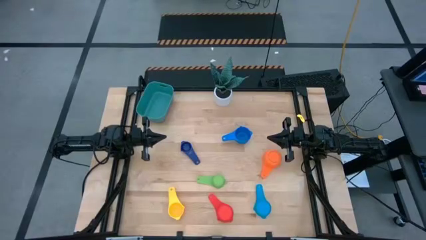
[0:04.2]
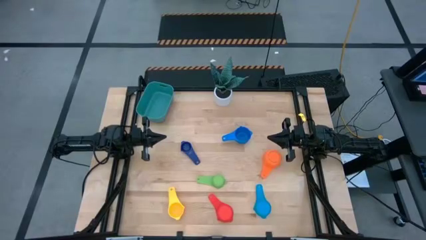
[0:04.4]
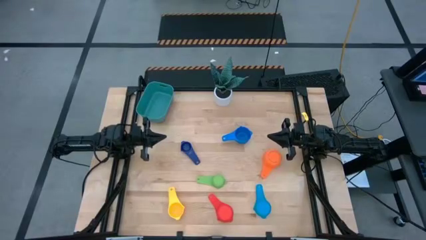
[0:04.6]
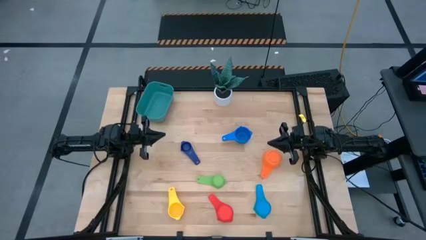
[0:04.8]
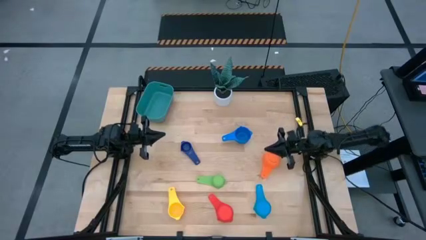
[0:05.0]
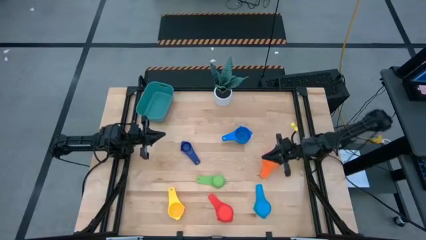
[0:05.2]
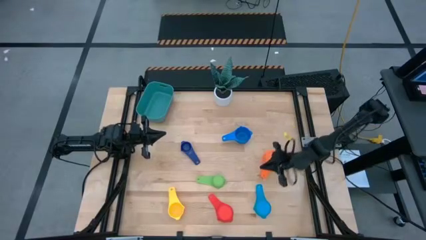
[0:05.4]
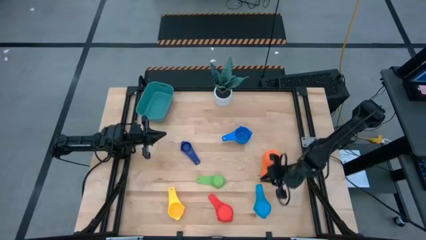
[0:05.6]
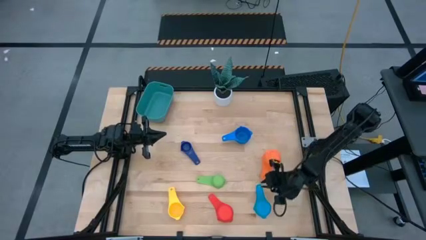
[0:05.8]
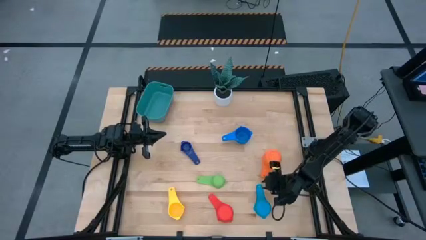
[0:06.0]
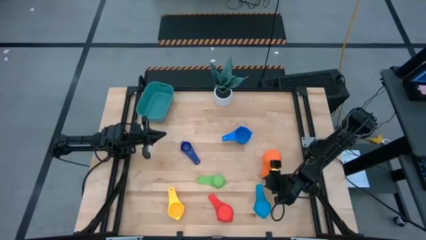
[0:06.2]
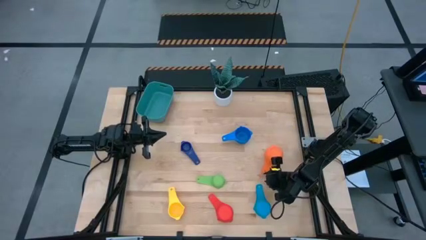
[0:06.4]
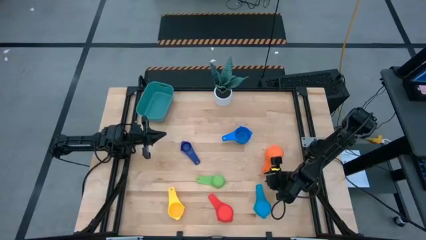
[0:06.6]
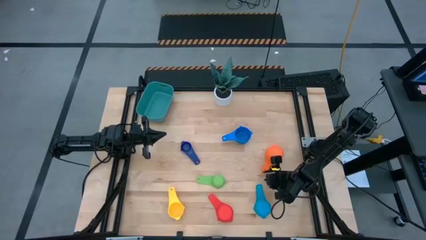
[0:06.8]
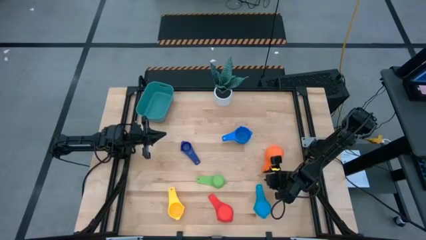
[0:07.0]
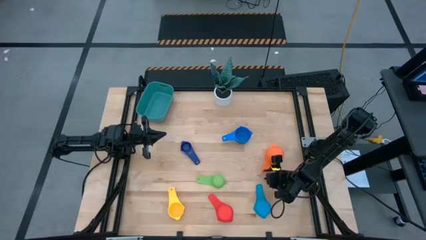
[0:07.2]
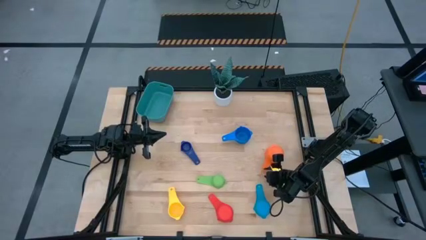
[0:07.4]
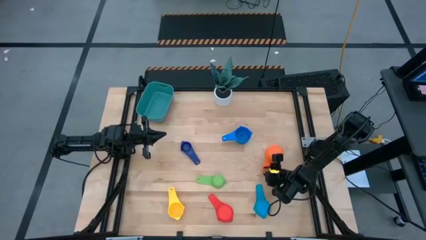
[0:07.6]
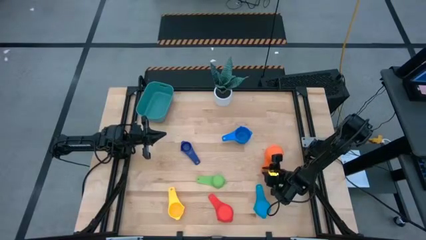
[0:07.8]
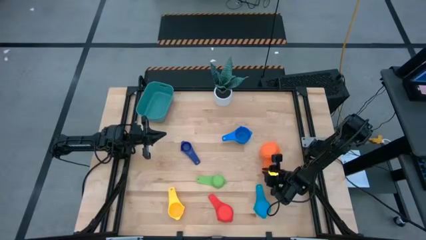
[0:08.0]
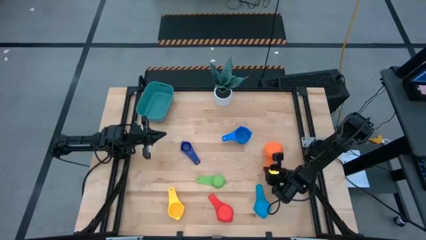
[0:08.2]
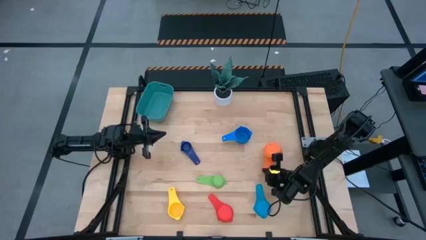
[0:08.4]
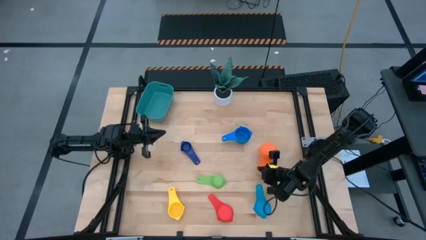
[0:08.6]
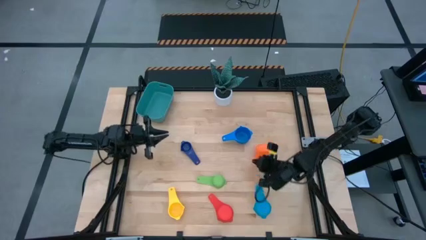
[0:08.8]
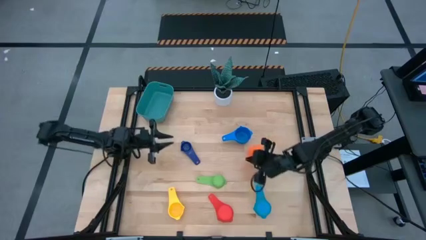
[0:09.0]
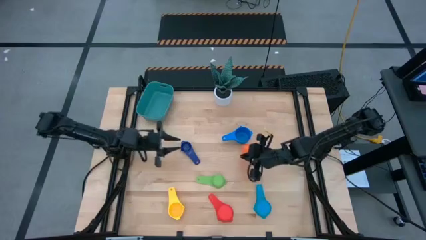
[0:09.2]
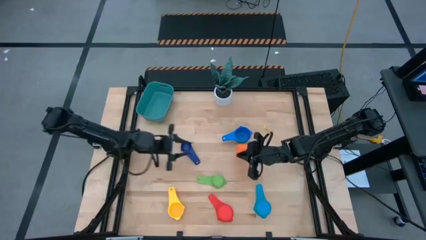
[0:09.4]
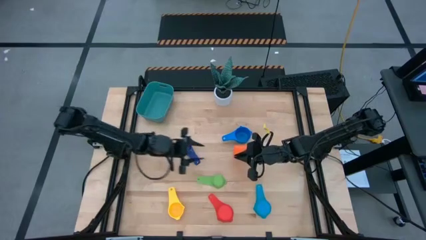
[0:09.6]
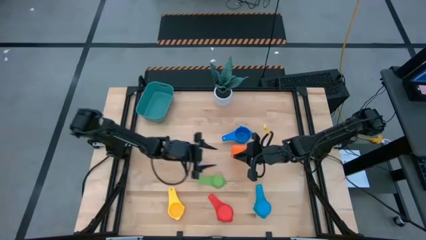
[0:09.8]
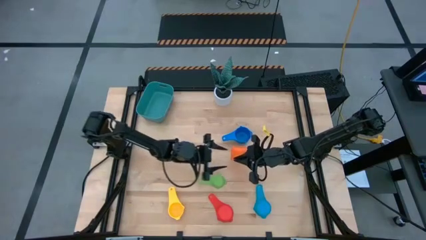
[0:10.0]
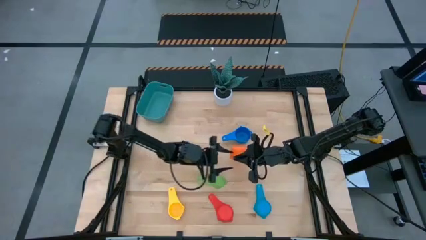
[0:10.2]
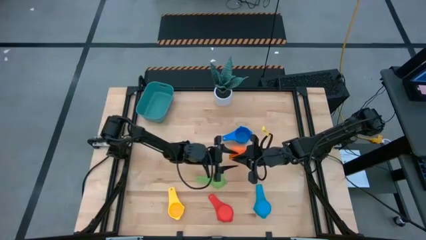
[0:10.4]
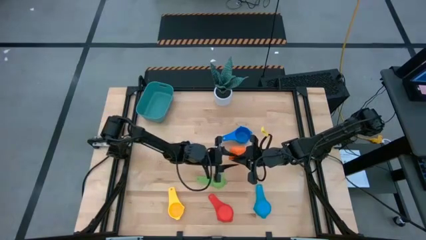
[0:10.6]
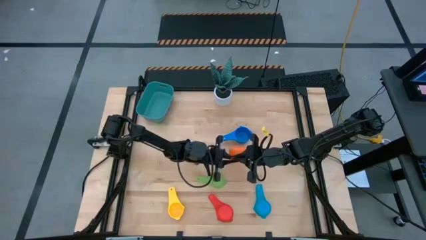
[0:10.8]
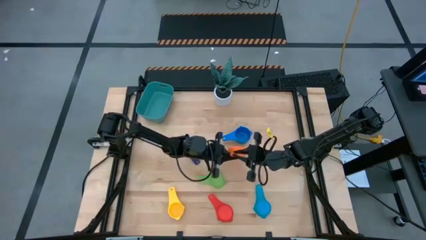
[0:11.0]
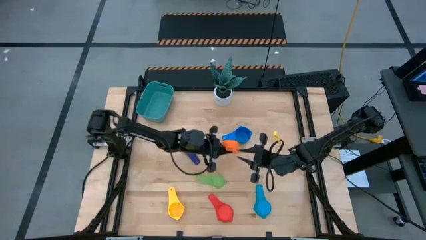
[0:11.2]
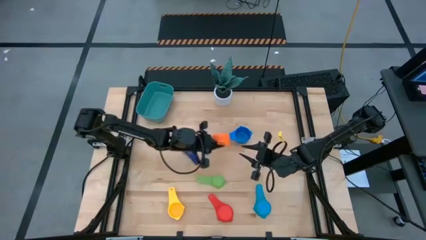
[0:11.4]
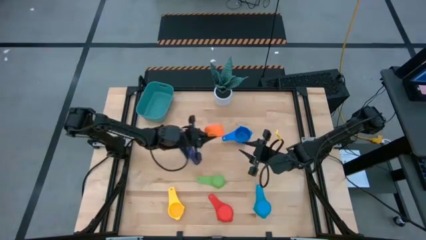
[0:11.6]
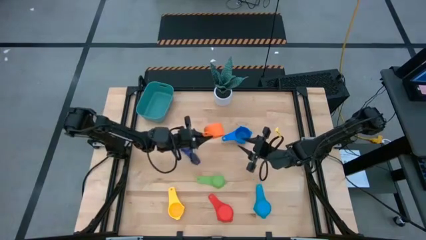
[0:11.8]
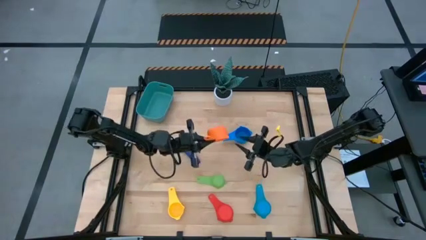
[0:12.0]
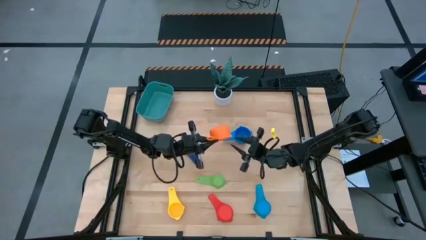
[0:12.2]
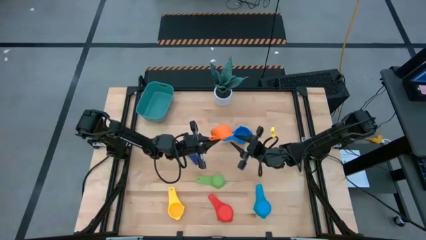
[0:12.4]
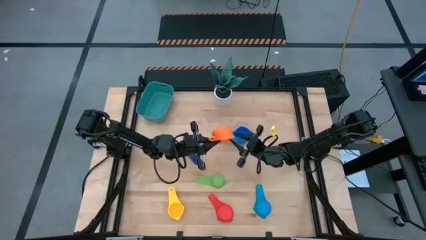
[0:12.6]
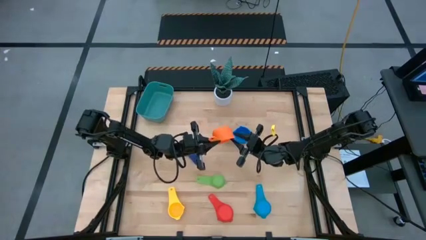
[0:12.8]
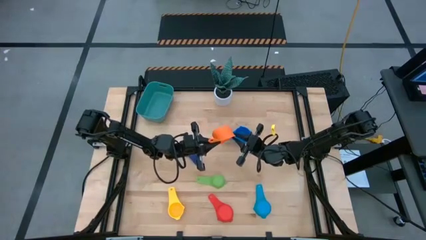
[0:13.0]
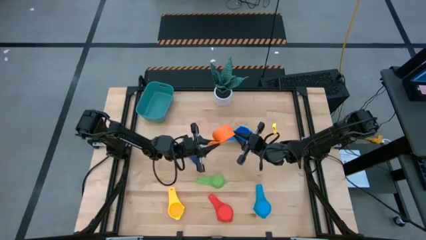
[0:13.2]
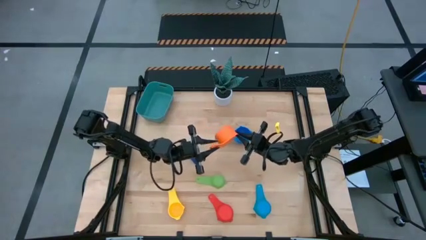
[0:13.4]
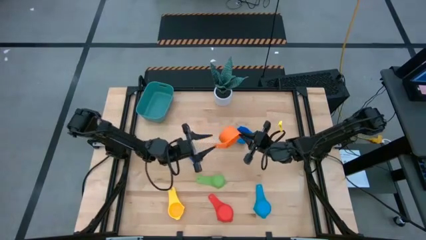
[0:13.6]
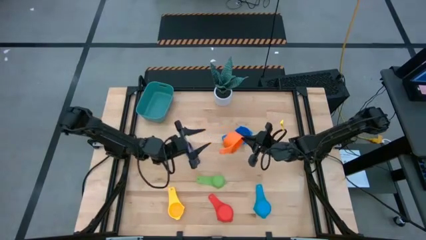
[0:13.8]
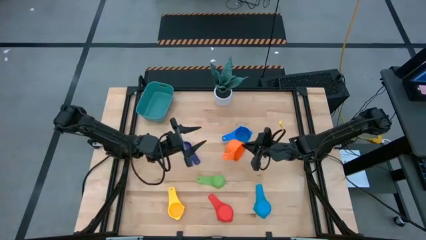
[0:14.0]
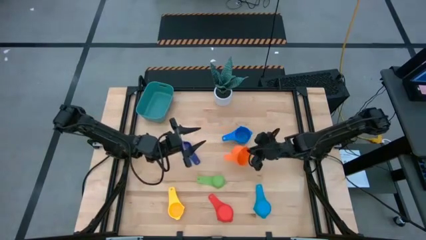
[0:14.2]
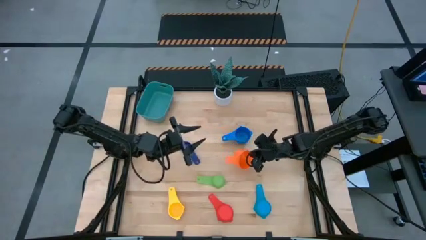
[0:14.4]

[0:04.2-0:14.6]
Task: Nest measuring cups in basket
Stack the blue measuring cup on top of the orange measuring cup
